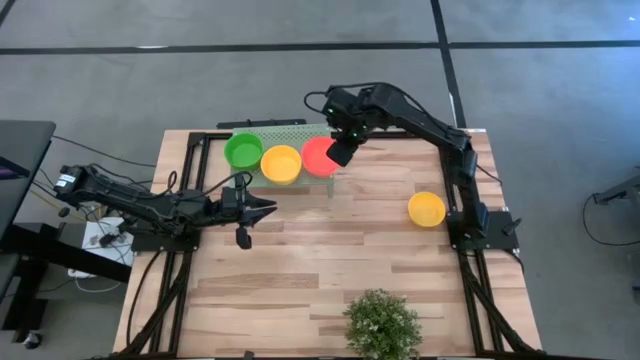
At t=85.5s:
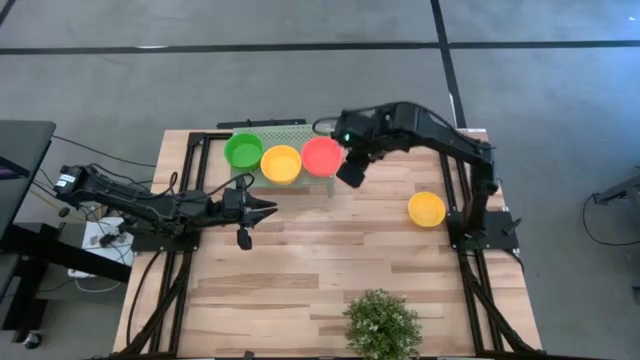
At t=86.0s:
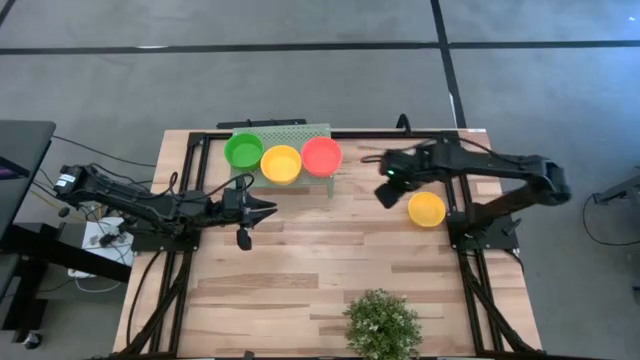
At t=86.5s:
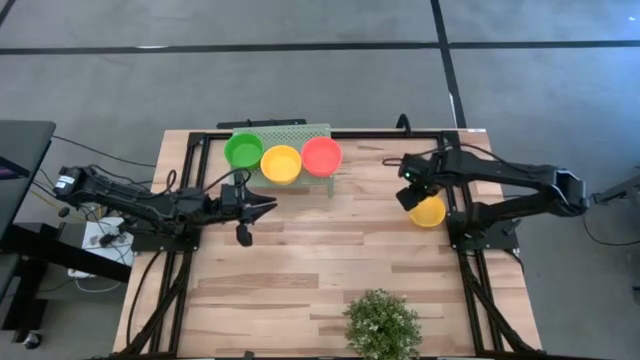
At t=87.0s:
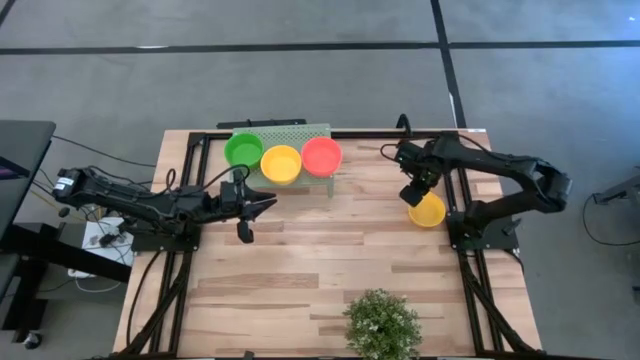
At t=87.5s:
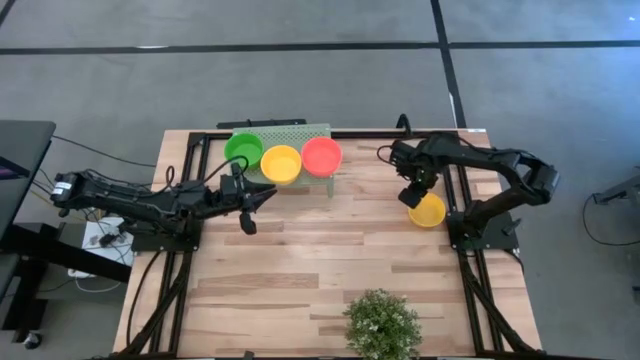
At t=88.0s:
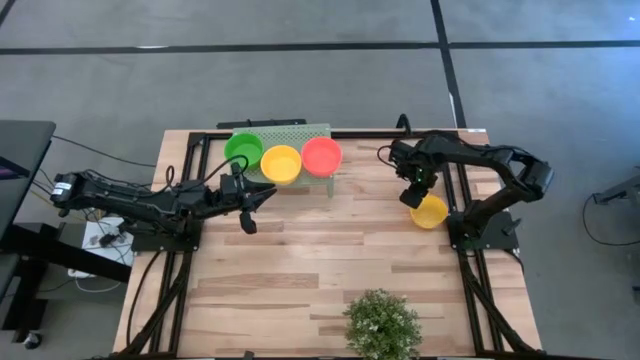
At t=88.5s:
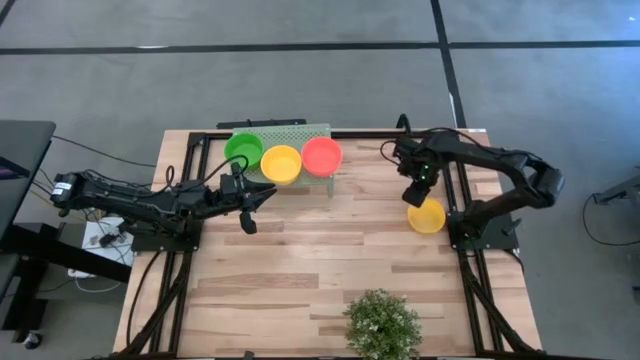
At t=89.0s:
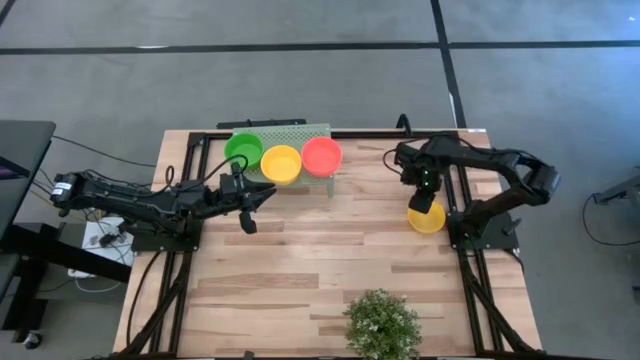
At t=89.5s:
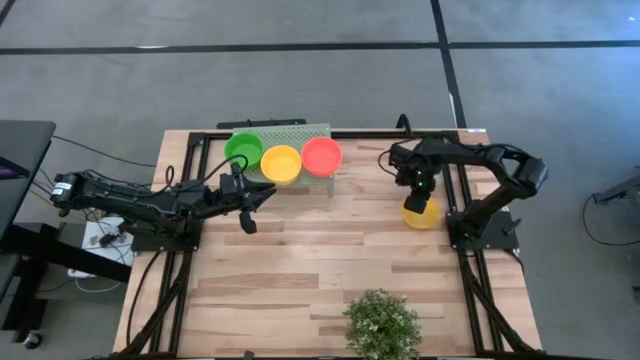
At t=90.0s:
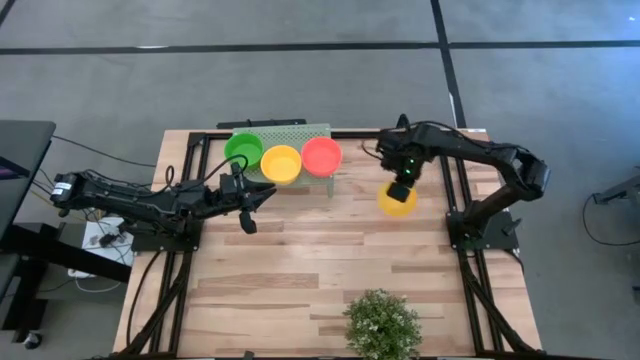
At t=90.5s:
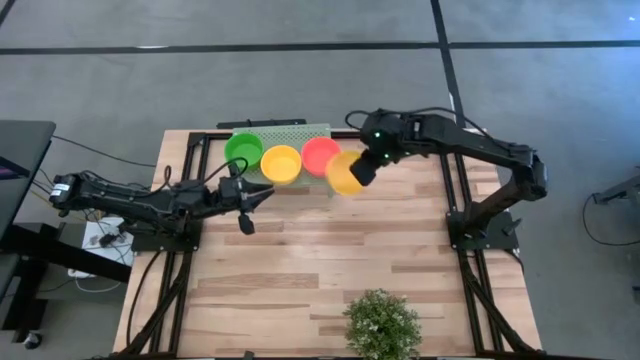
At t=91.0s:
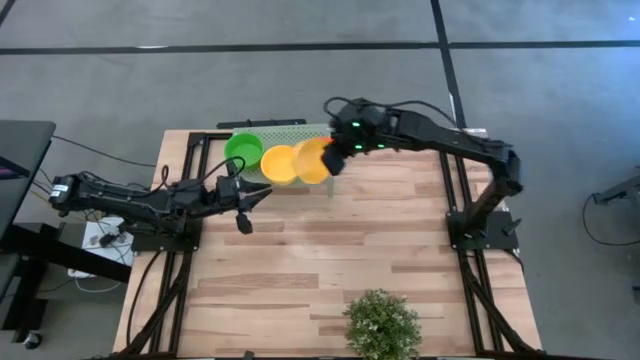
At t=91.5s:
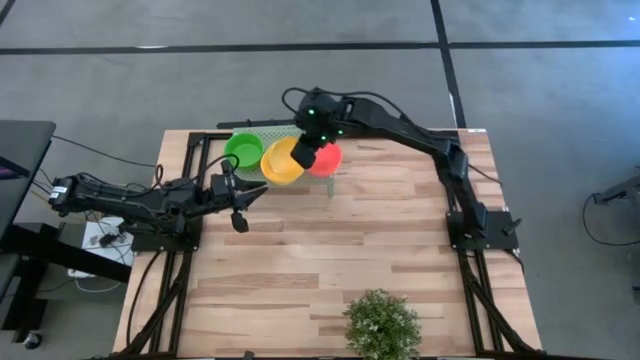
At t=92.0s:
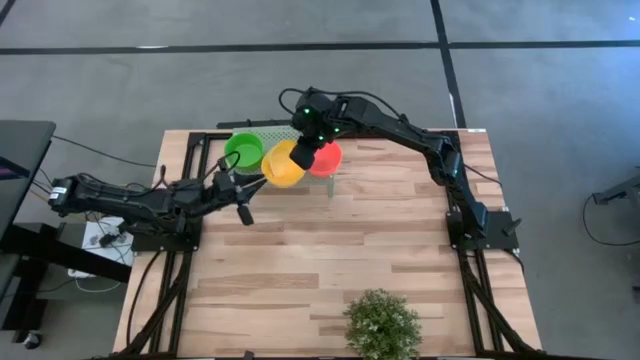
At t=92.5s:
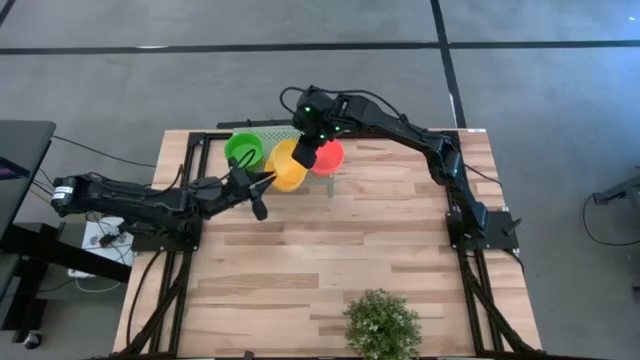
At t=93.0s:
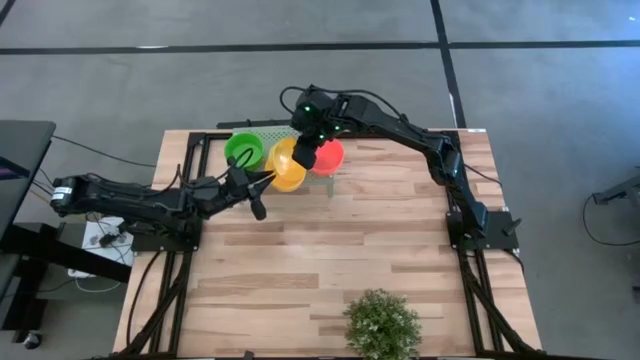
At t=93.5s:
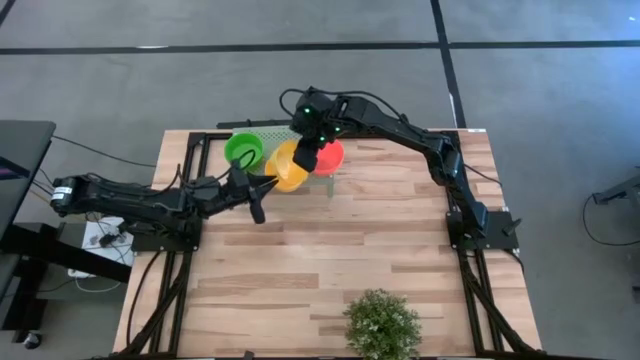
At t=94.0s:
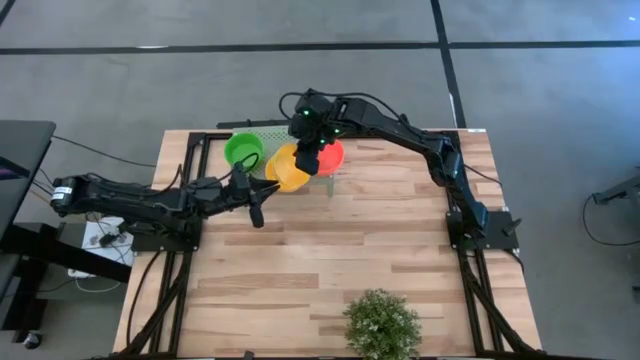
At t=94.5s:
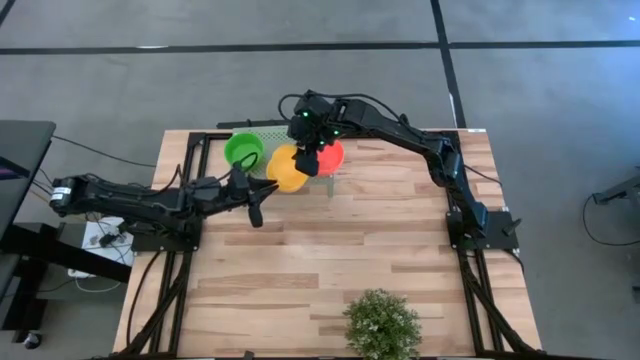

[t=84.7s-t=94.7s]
Task: Pick & Place Mini bowls
Stack the yellow bowl on top of the yellow bowls on the shelf

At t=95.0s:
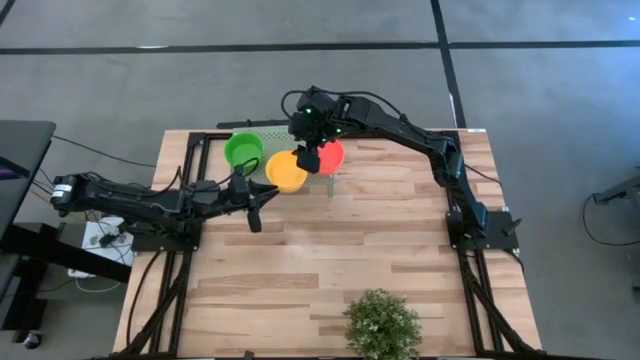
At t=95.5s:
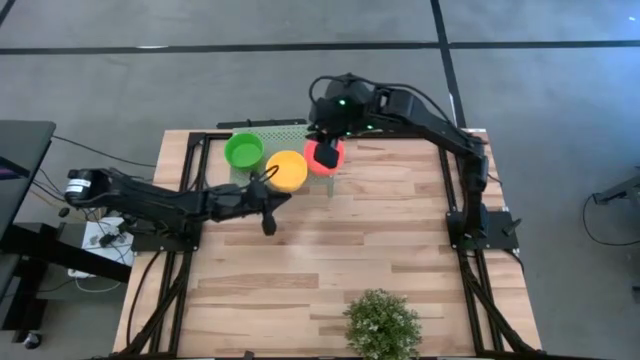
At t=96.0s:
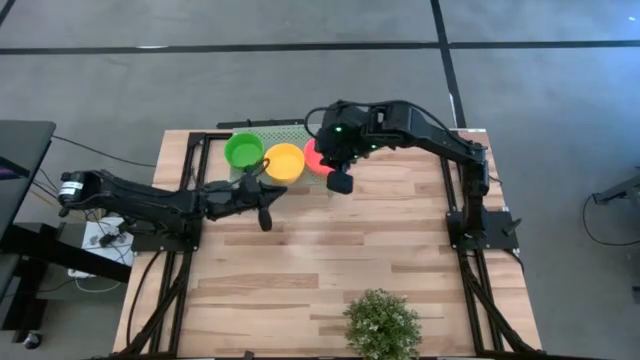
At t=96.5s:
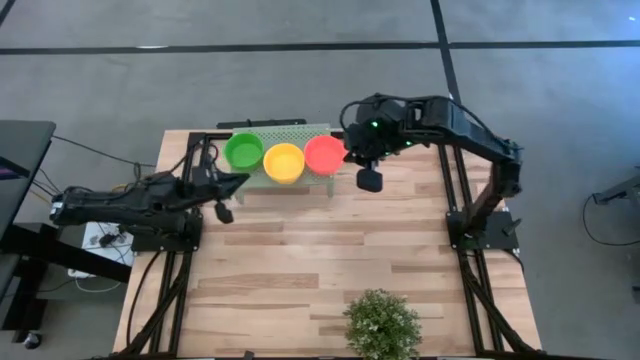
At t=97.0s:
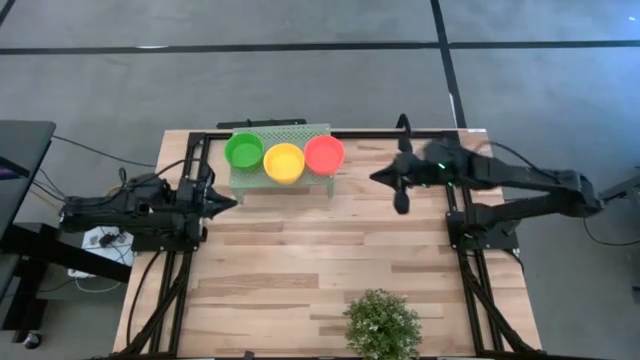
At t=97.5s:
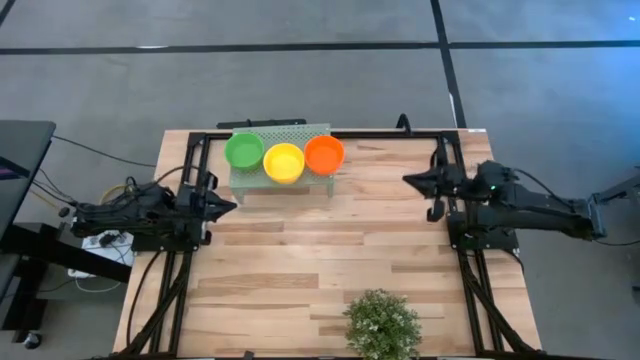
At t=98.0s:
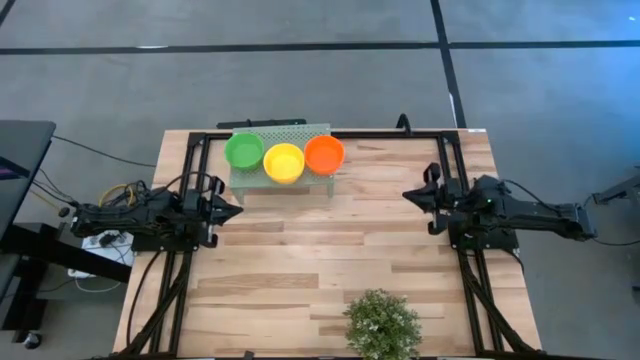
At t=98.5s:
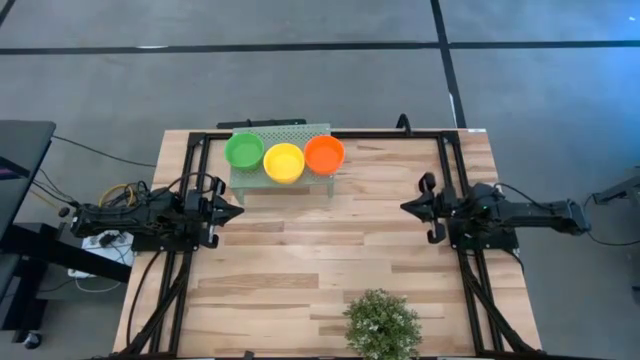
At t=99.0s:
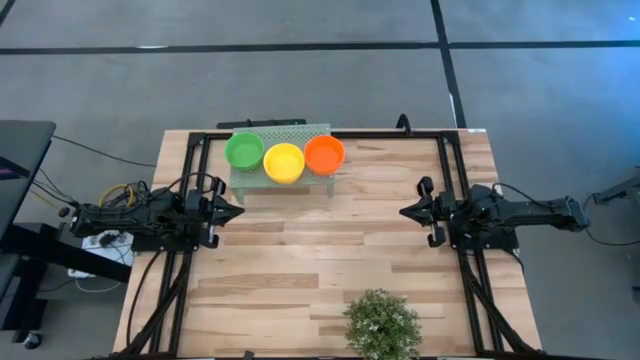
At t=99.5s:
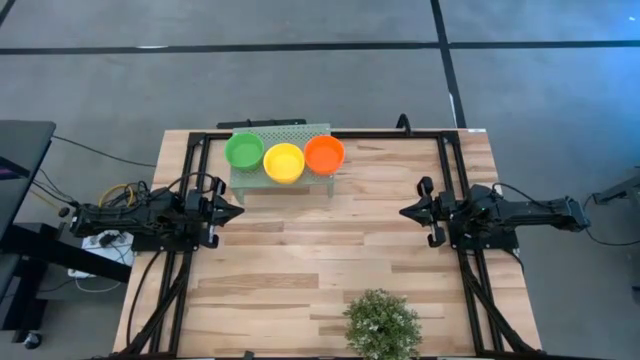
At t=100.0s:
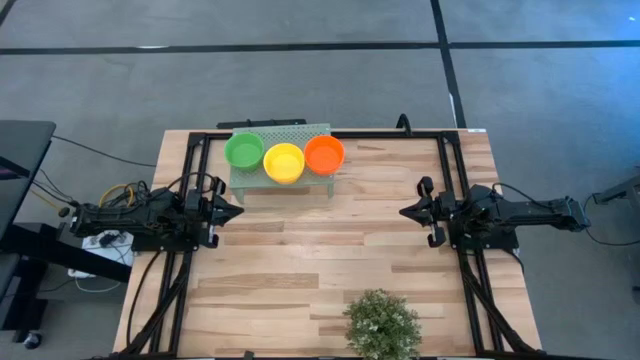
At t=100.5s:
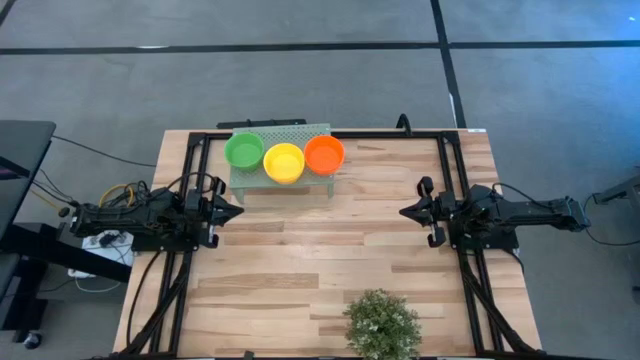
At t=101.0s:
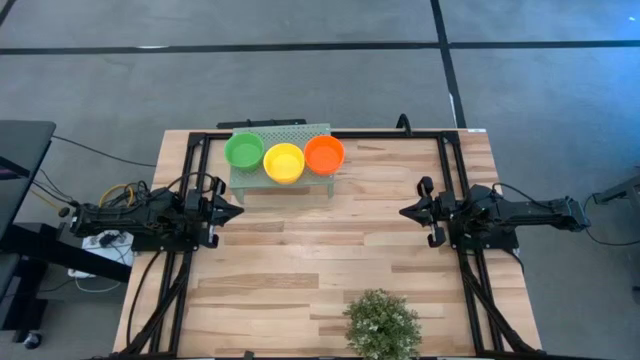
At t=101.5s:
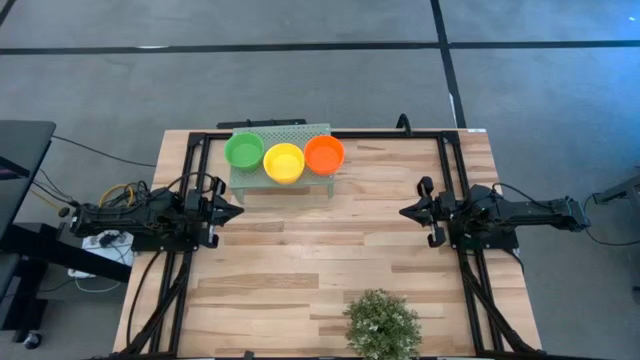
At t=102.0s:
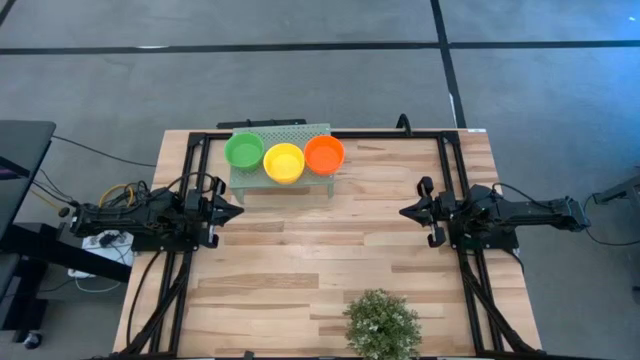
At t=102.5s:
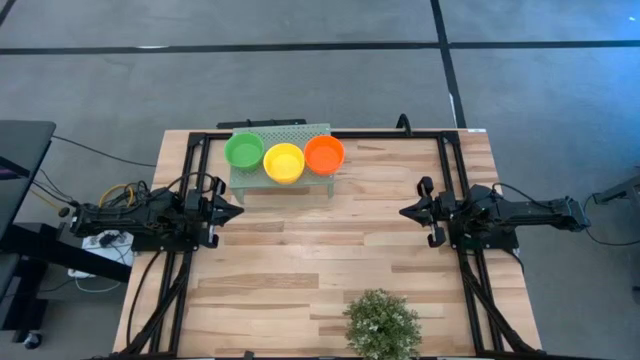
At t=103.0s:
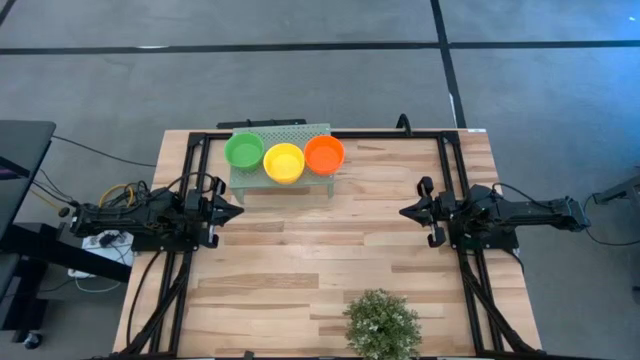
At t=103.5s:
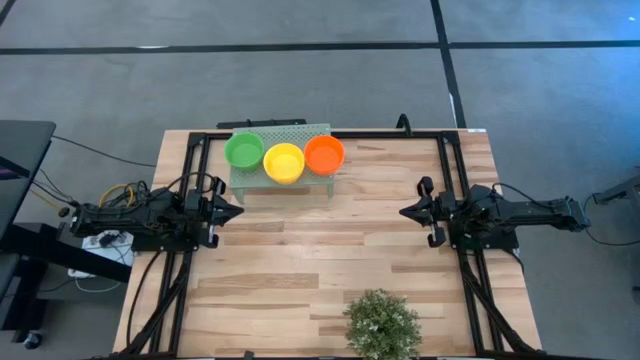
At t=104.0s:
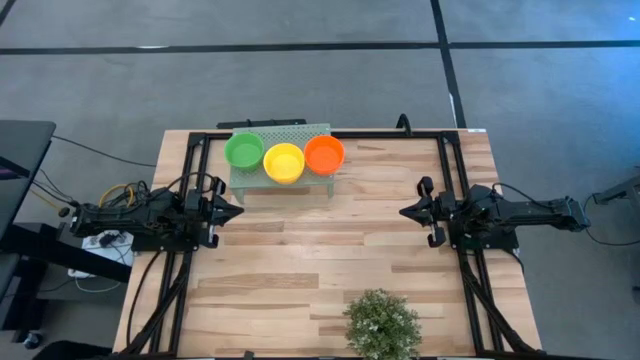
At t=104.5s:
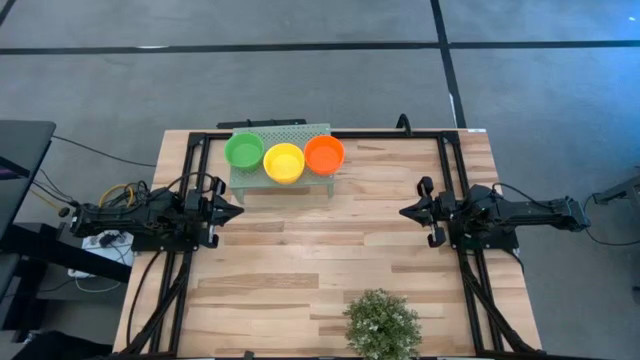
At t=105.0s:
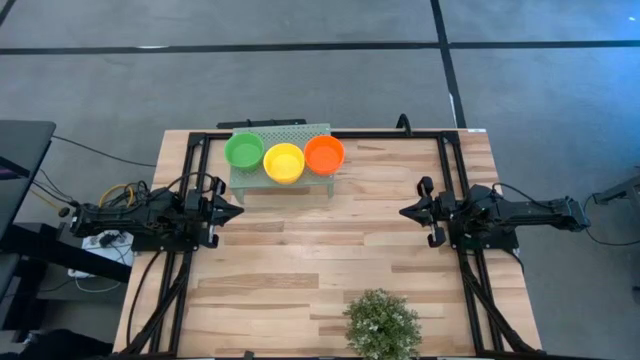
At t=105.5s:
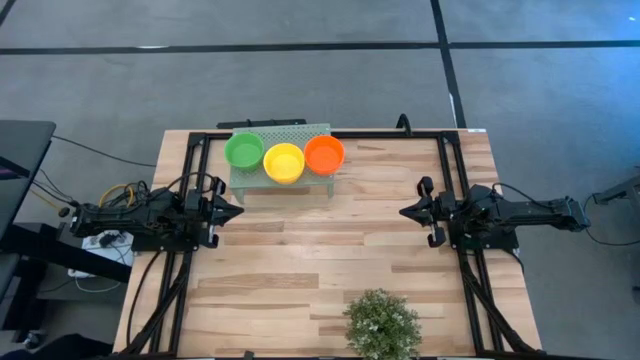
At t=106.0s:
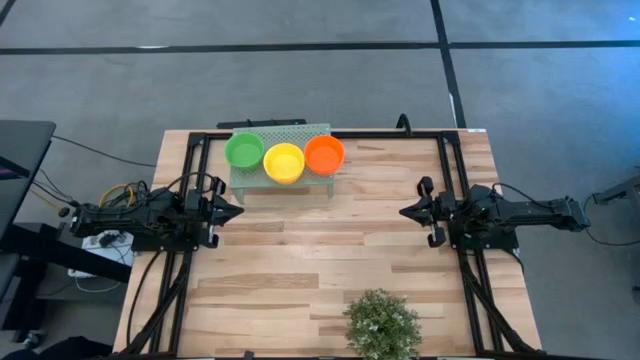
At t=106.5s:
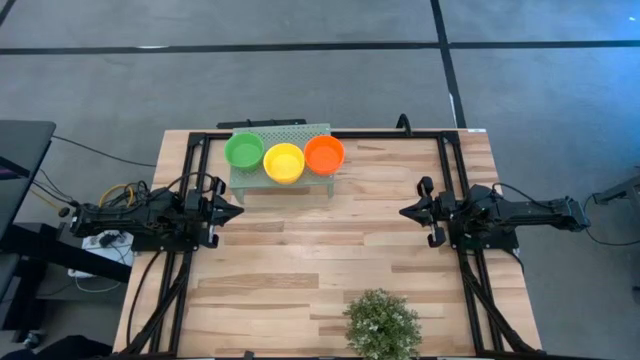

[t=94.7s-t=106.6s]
Return to Home Position
